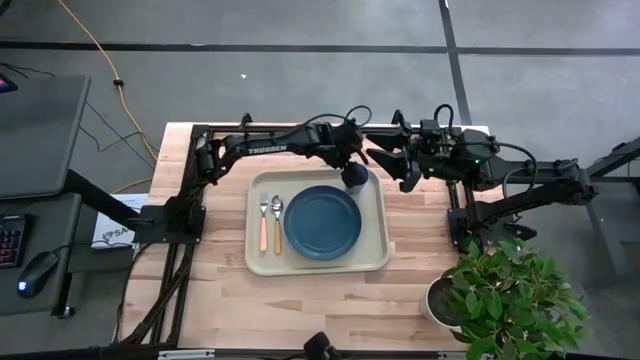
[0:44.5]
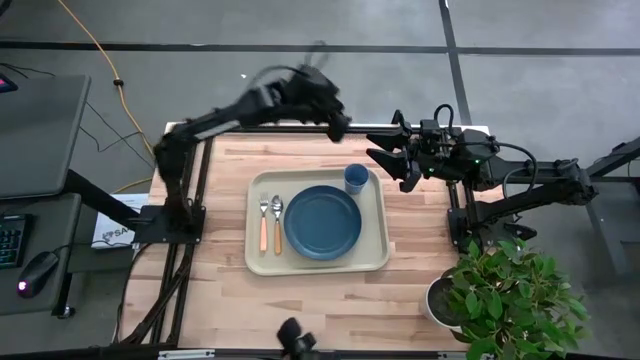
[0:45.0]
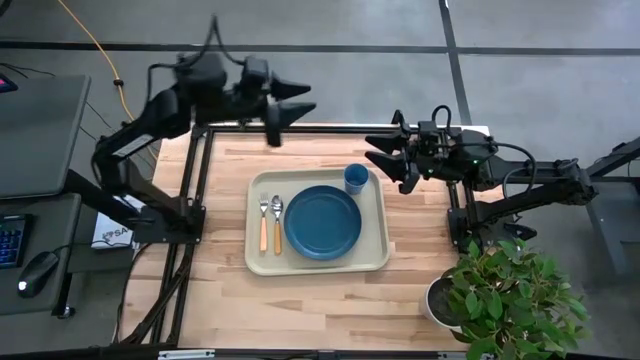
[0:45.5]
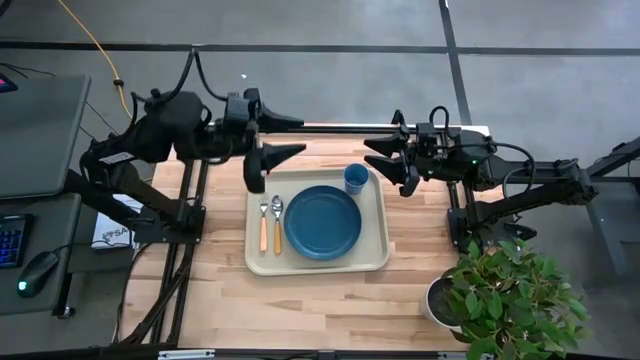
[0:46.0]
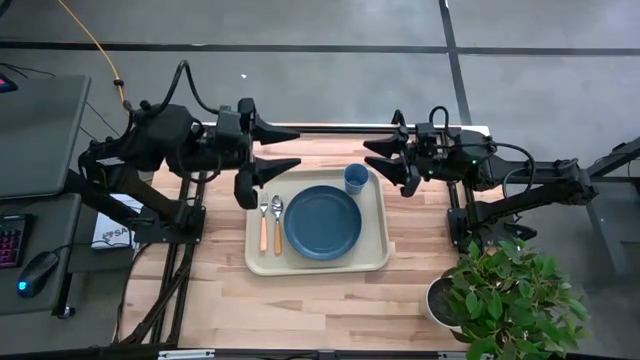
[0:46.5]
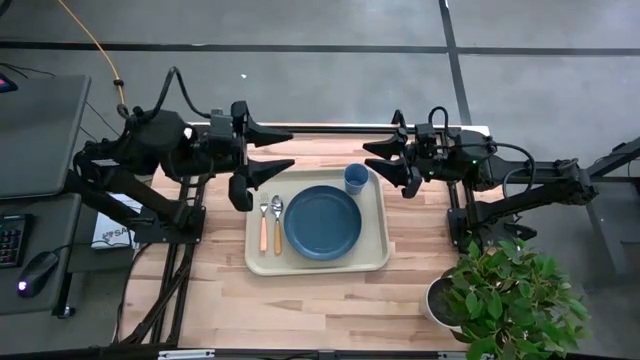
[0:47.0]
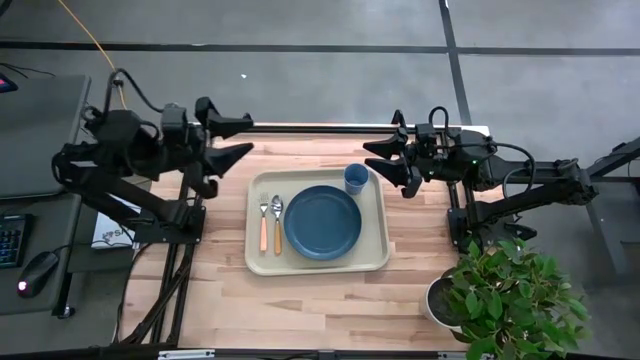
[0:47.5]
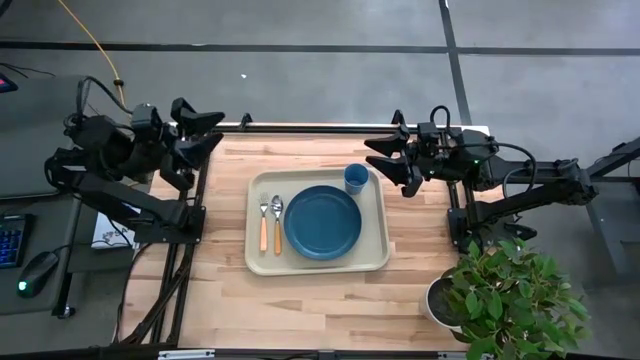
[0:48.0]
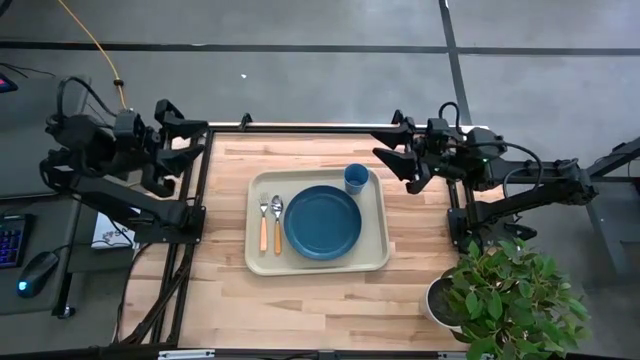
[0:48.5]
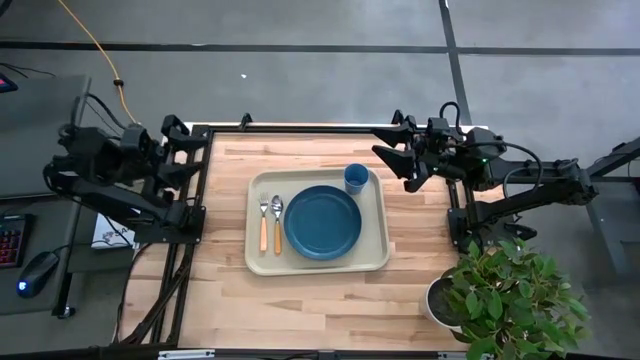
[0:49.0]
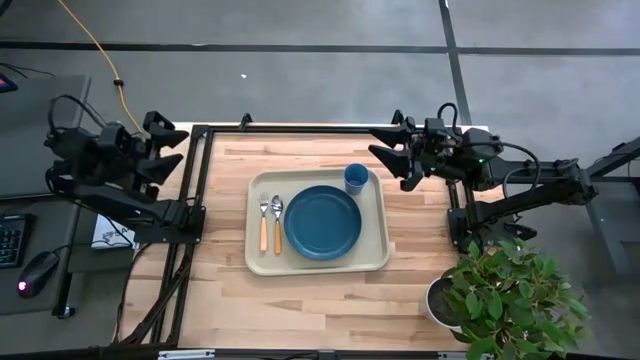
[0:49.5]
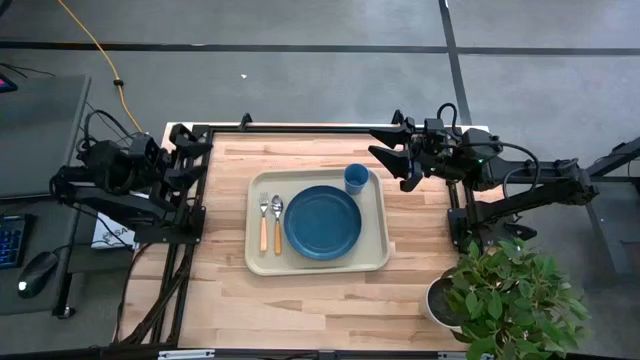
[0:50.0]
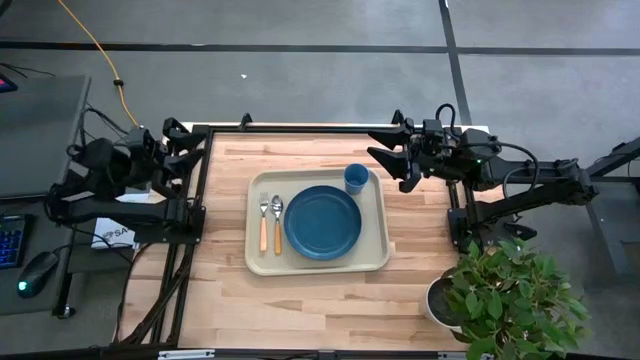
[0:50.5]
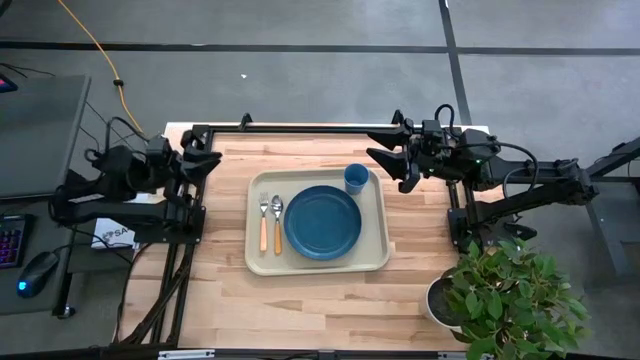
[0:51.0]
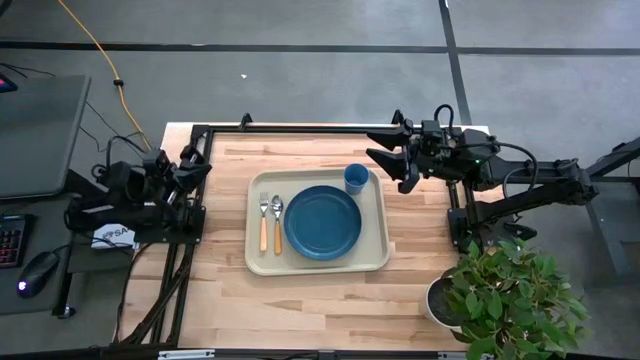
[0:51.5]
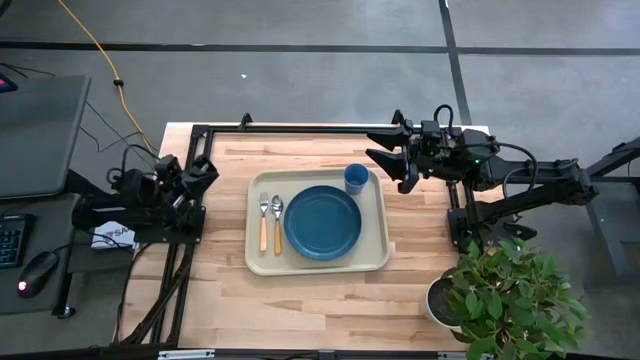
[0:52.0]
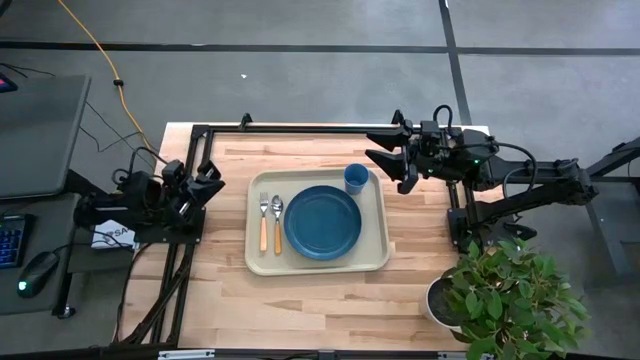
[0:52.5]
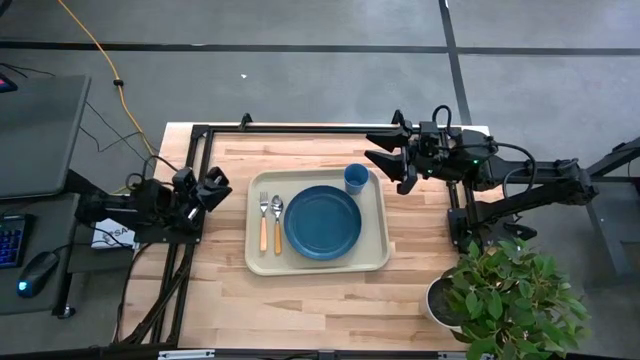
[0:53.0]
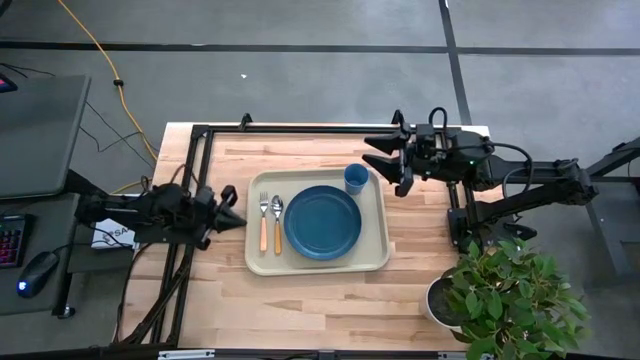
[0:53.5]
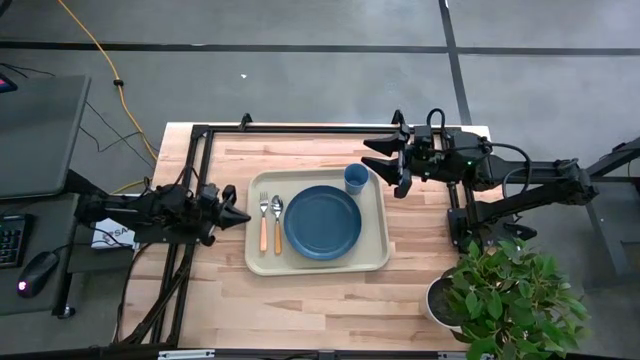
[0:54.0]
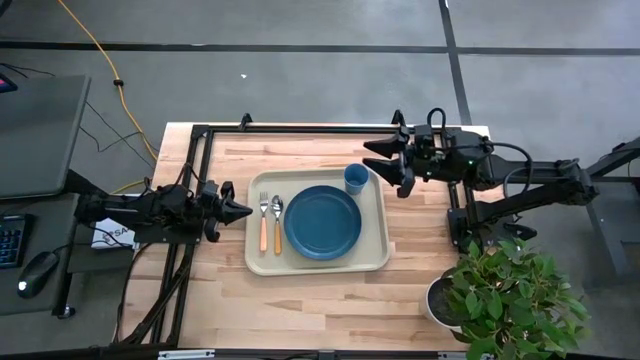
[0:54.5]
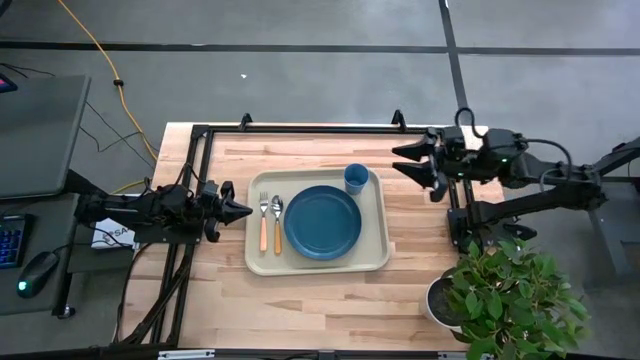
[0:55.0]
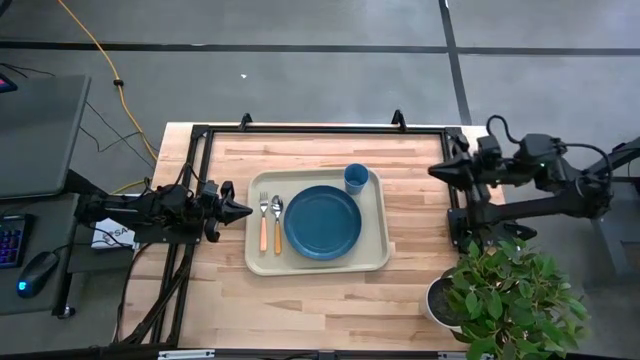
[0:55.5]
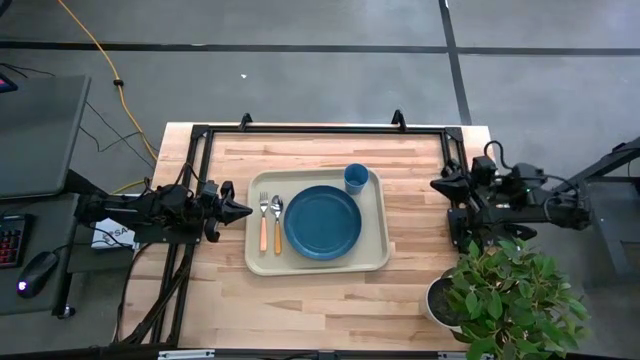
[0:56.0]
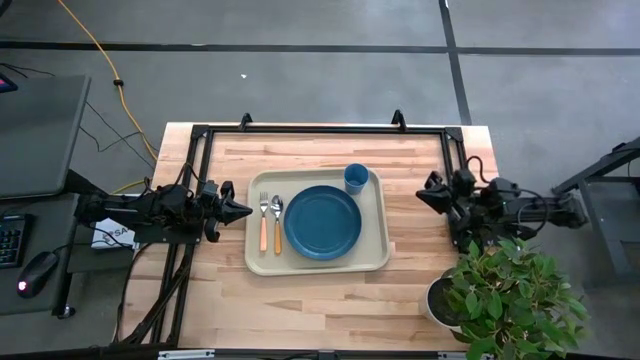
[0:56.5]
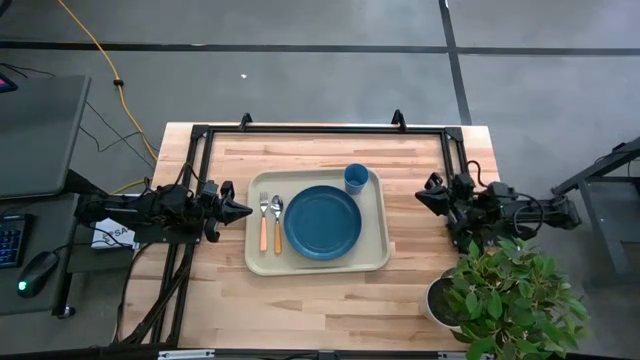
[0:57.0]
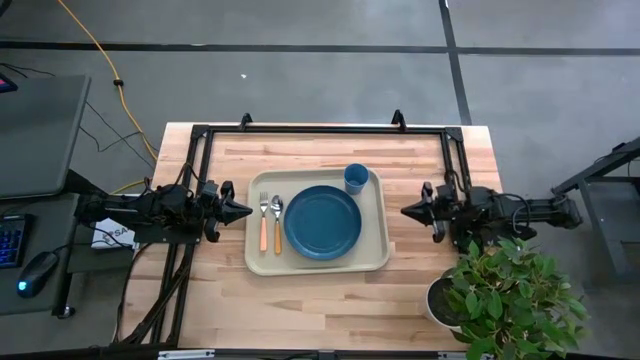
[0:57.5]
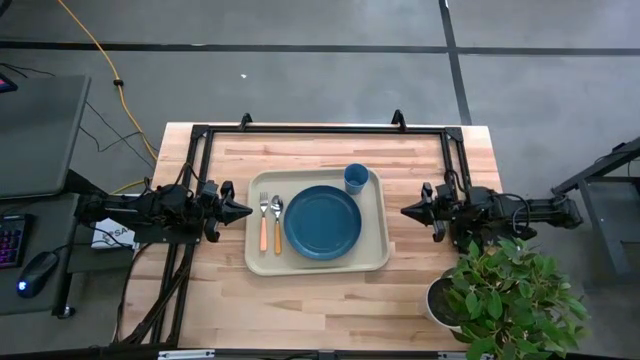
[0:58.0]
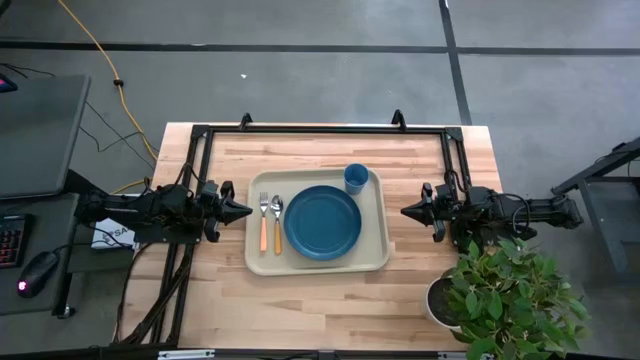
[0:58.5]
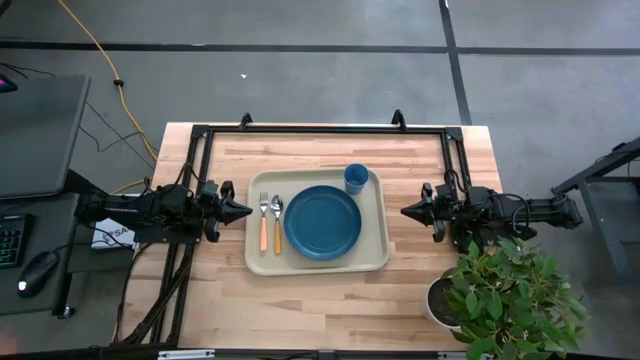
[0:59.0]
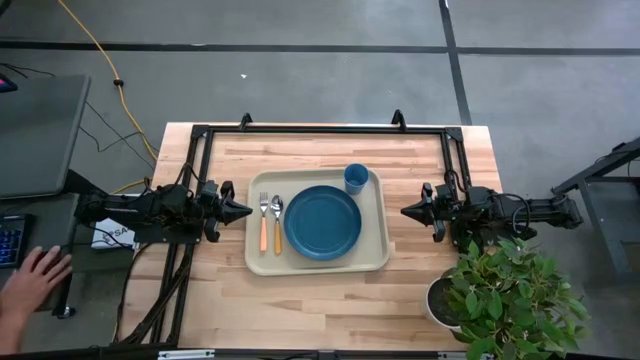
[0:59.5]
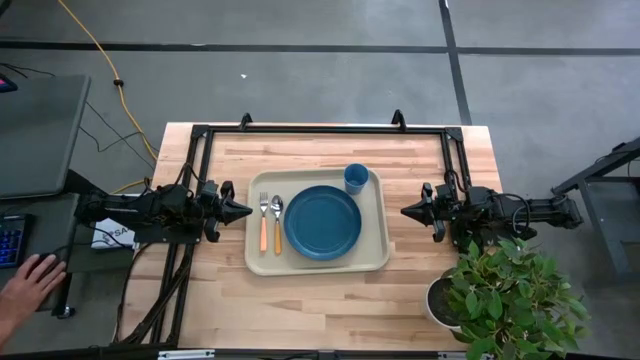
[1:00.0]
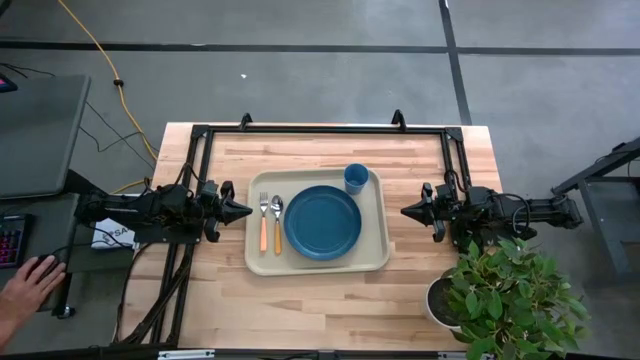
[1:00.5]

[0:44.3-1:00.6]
Task: Pick and place plate/cup/fork/spoon on tray
Return to Home Position

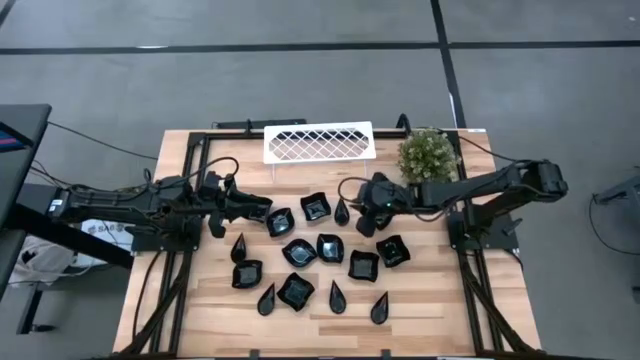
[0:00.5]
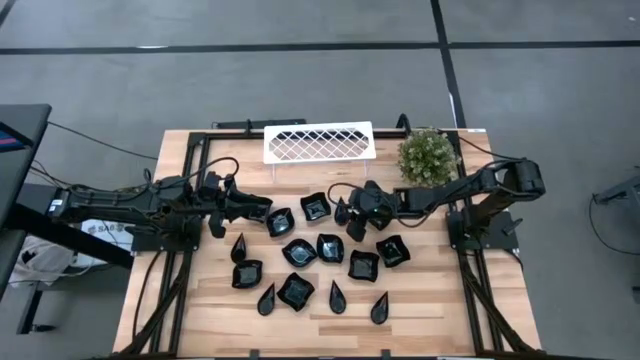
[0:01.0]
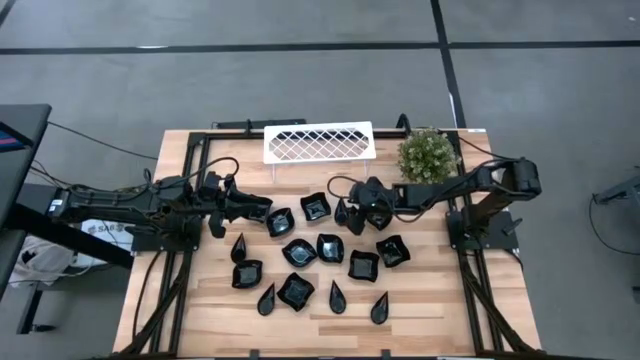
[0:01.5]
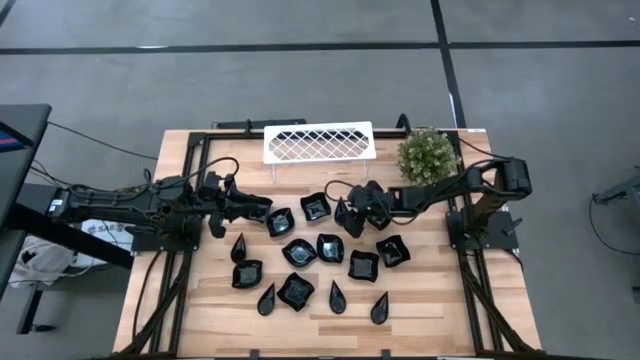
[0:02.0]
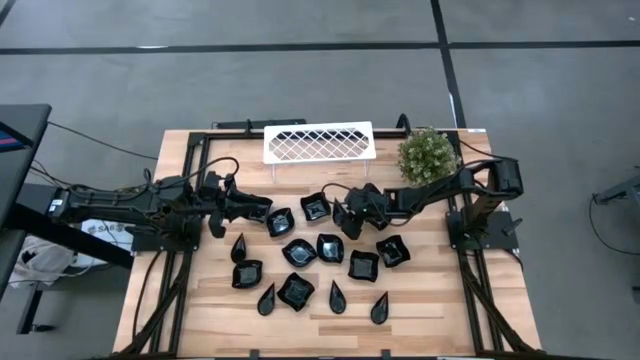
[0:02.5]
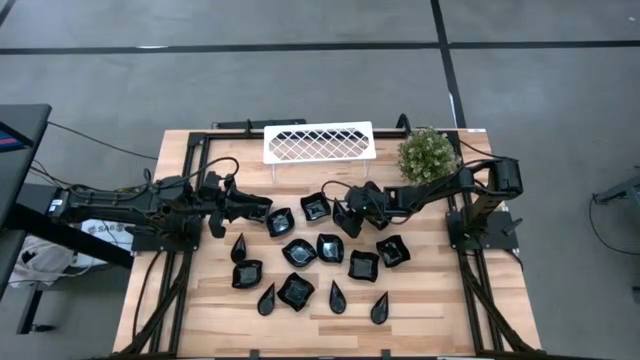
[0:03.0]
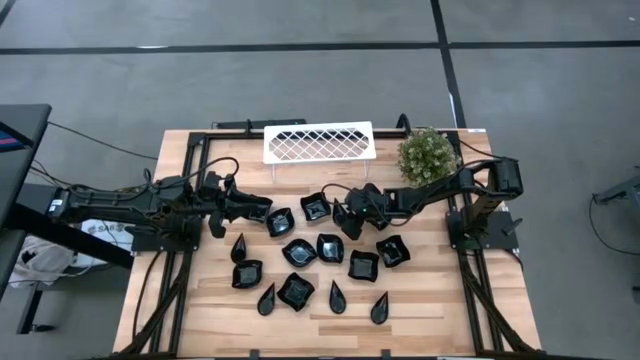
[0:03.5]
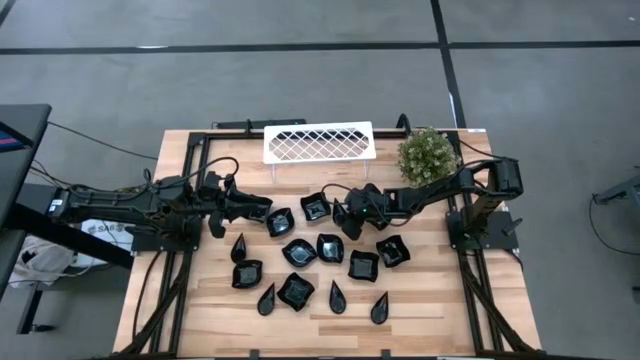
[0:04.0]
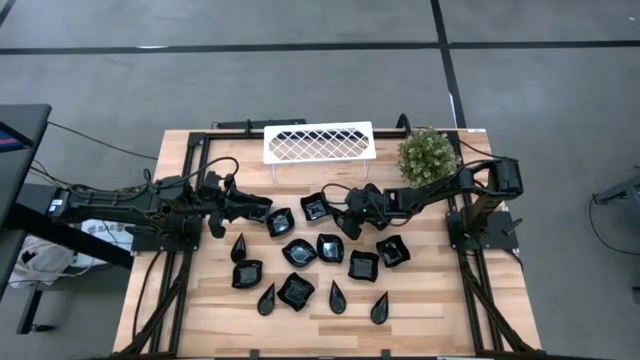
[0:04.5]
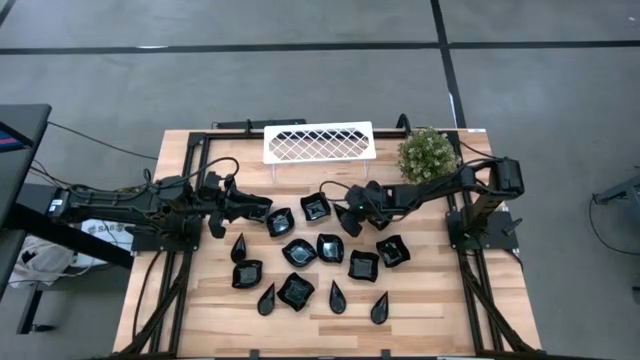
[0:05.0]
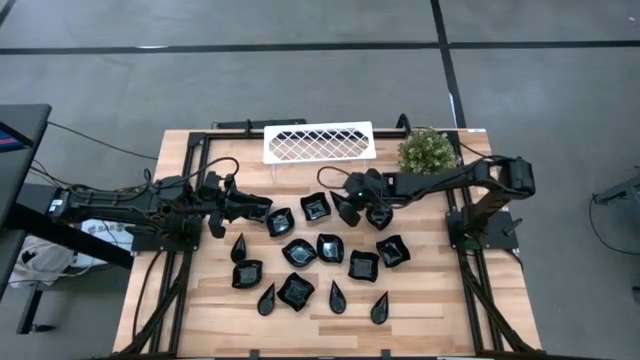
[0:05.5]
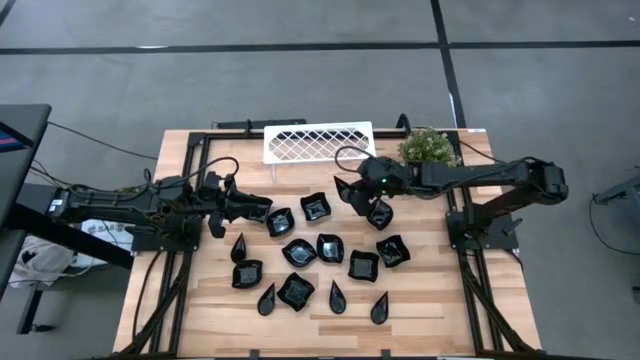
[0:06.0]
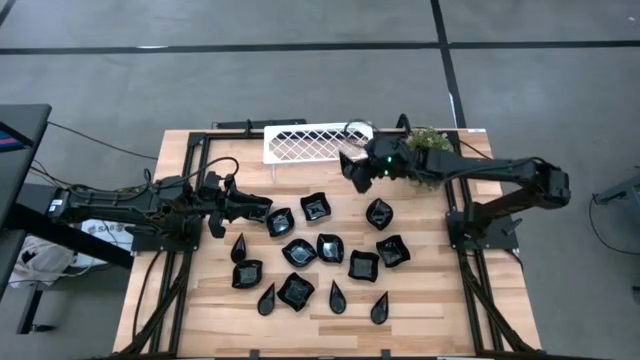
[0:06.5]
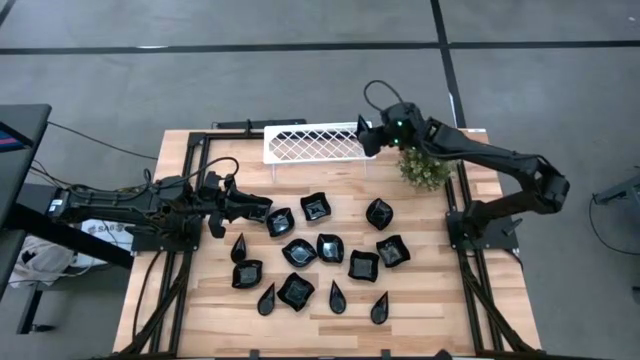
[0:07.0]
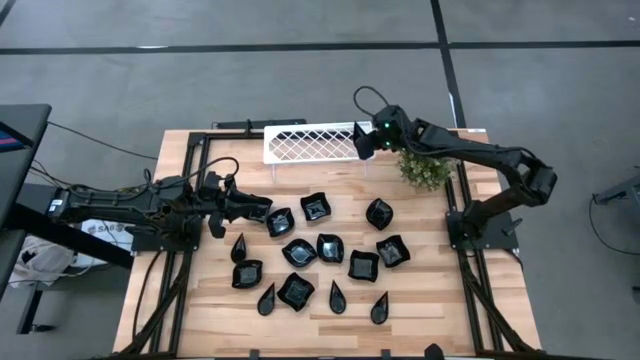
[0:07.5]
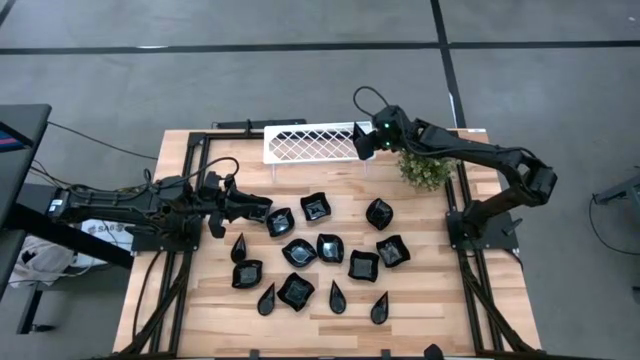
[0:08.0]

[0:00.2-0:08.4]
Task: Pick & Place Mini shaped plates
Put the black drop shaped plate on the shelf
